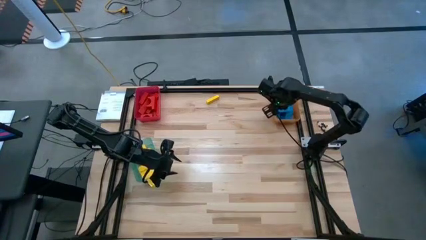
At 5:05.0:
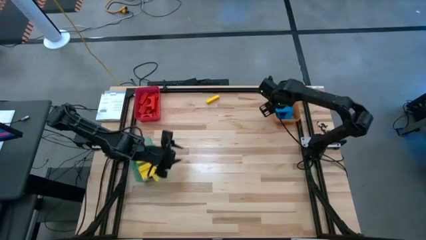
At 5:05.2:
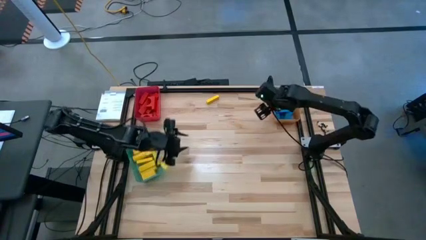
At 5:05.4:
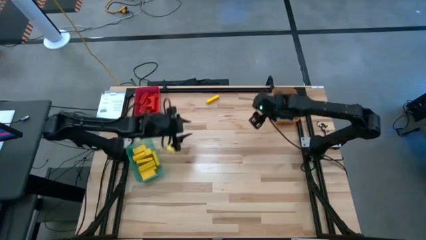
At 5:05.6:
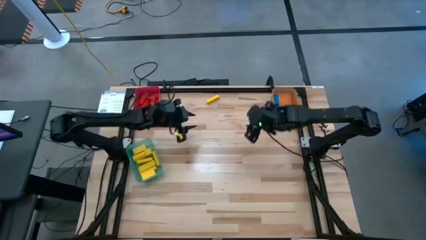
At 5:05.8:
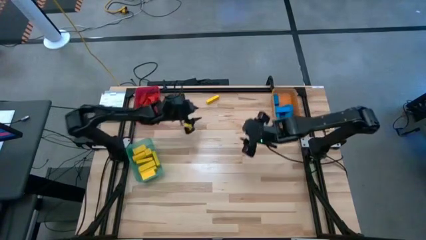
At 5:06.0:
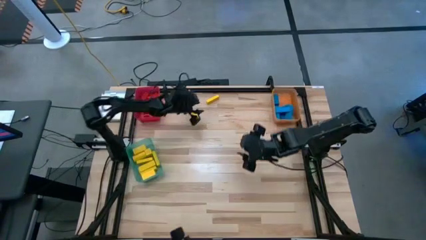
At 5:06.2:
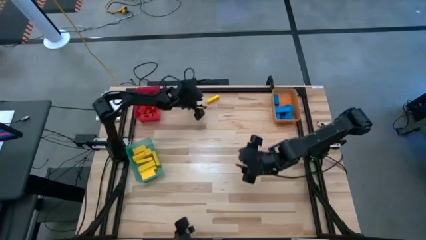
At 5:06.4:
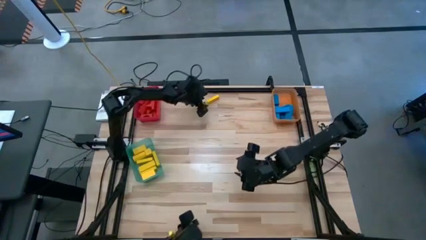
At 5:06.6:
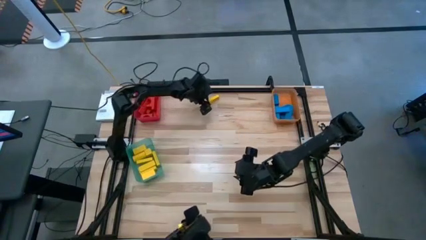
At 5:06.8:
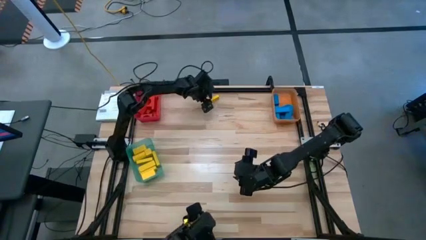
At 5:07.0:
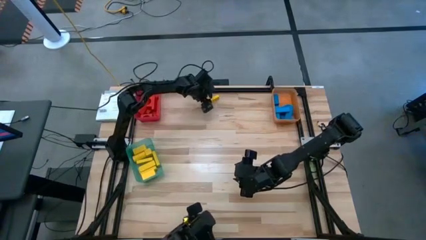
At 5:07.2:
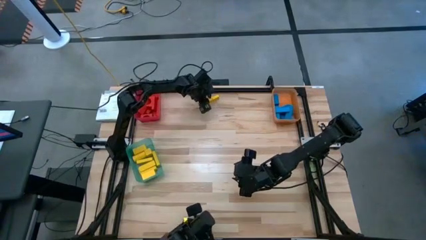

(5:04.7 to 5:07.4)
Task: Sort blocks
Put the yellow block into the green bin

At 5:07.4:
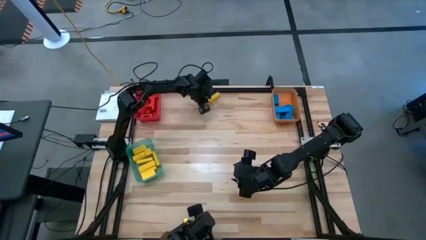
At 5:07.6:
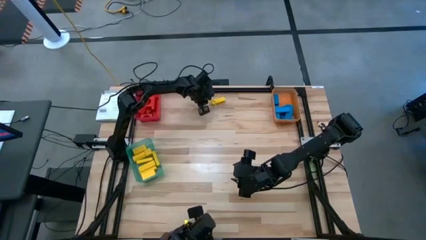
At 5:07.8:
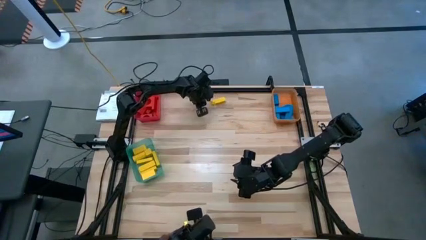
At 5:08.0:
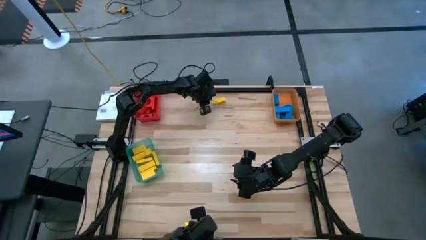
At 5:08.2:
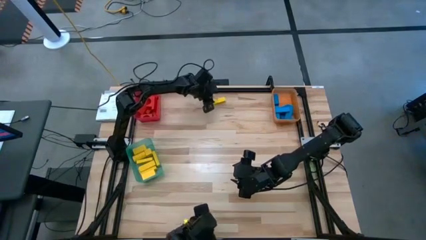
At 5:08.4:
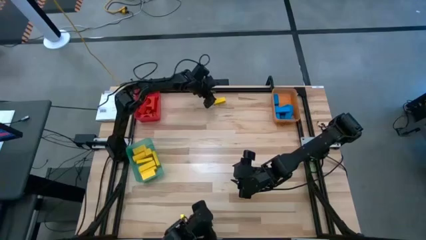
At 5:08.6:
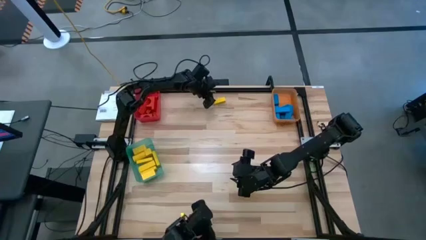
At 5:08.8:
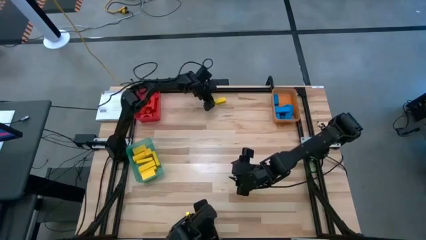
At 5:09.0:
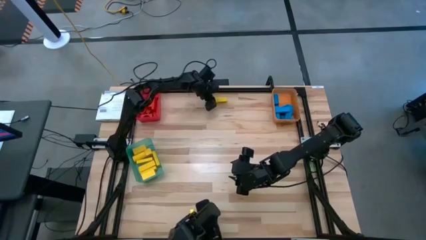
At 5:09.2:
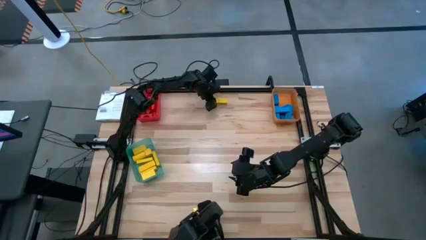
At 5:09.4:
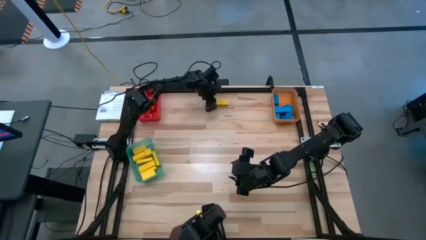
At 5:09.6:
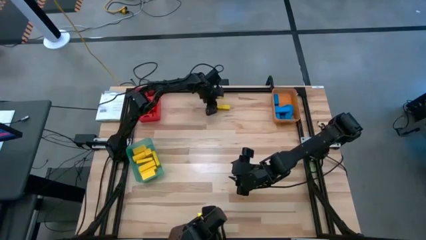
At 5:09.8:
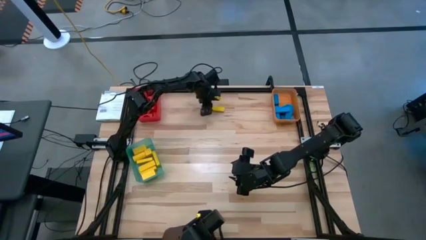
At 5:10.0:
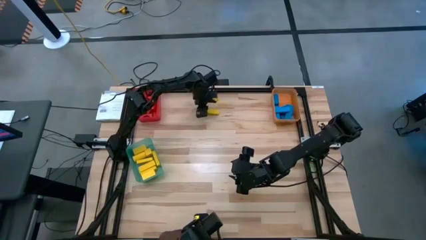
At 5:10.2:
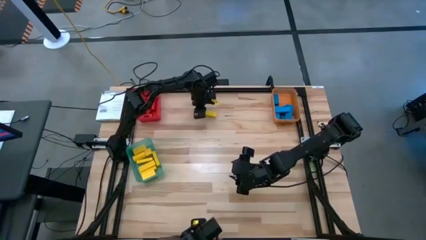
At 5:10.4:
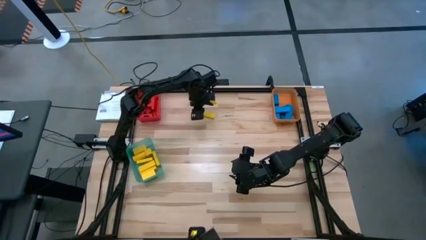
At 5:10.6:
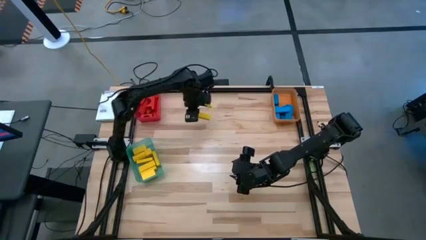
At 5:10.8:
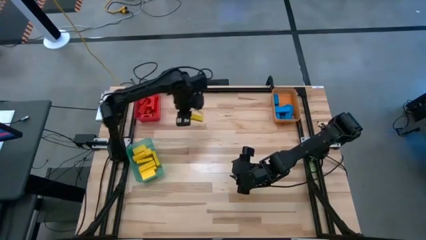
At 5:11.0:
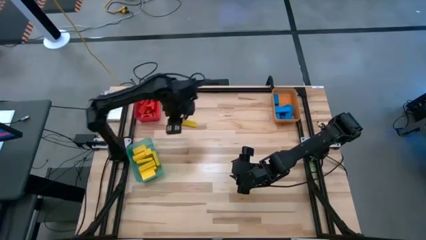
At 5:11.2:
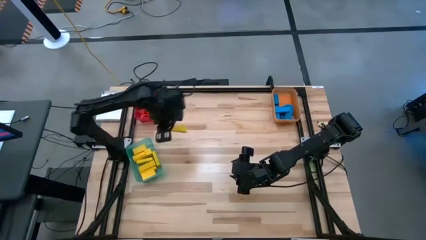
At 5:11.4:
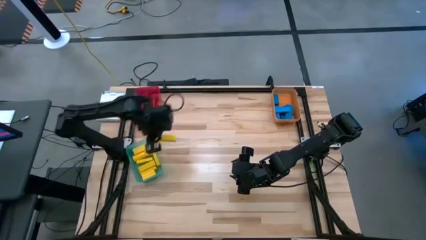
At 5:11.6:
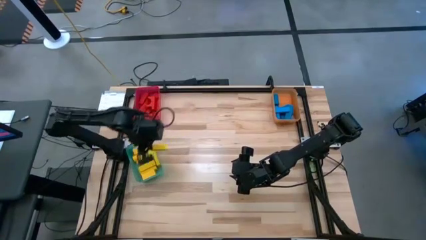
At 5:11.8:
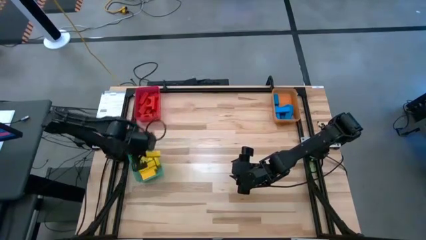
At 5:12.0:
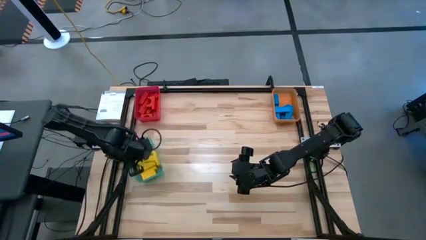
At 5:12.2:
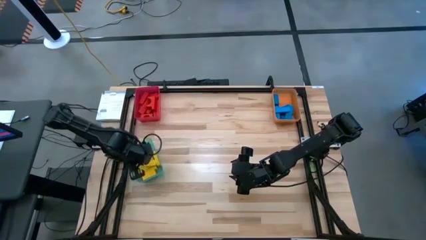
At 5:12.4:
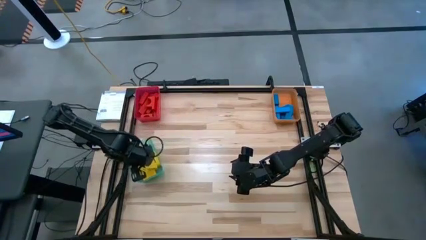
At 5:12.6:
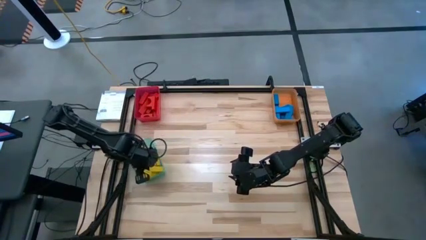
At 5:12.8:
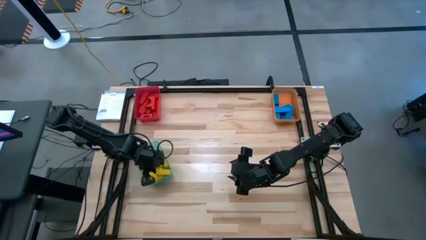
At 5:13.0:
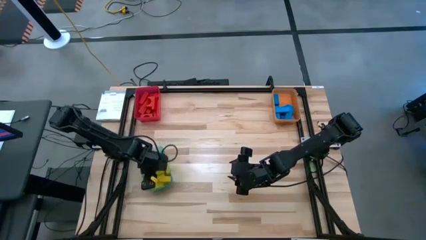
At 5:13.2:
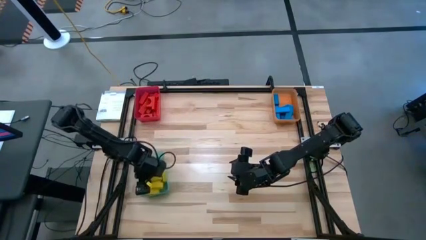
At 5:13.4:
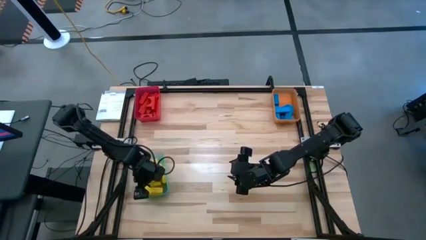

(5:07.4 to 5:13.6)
Put the yellow block into the green bin

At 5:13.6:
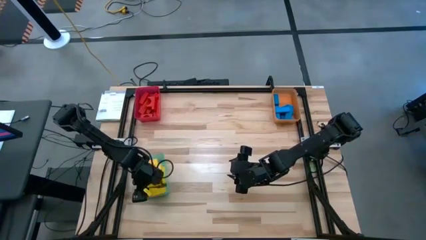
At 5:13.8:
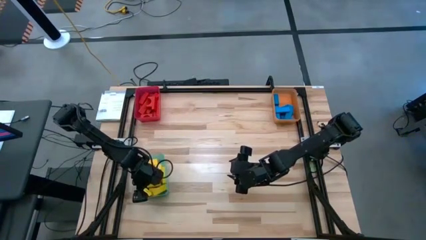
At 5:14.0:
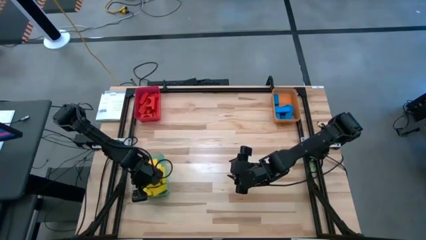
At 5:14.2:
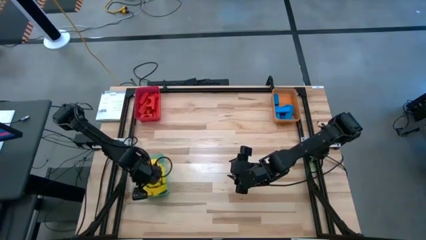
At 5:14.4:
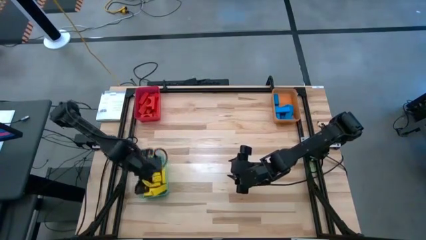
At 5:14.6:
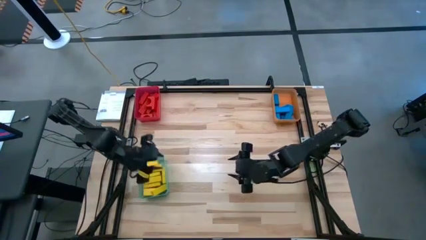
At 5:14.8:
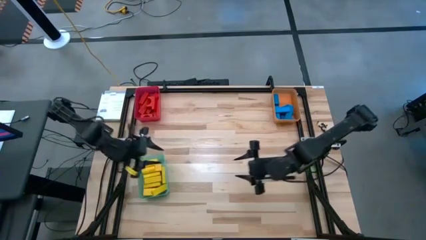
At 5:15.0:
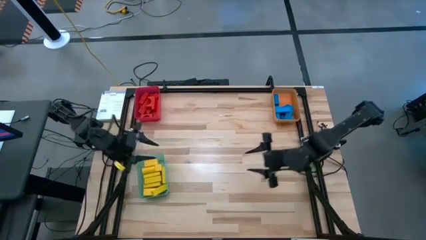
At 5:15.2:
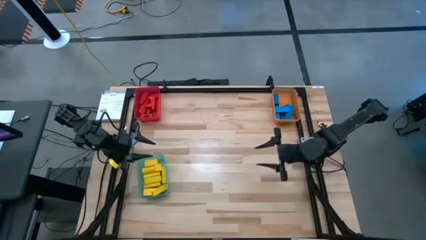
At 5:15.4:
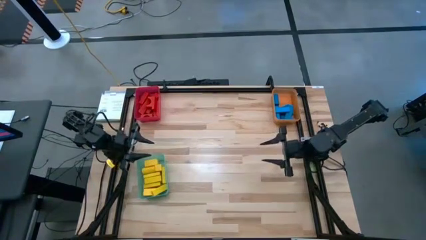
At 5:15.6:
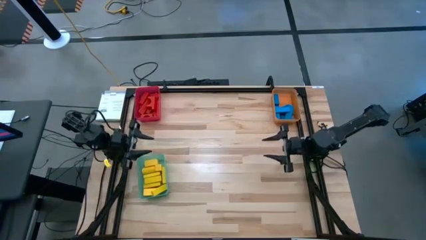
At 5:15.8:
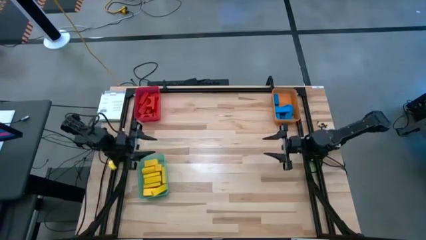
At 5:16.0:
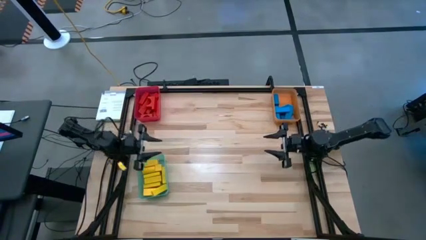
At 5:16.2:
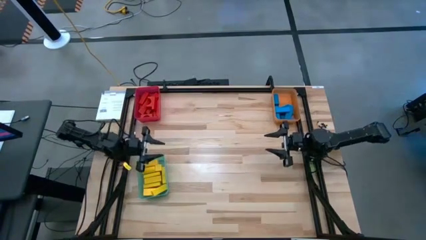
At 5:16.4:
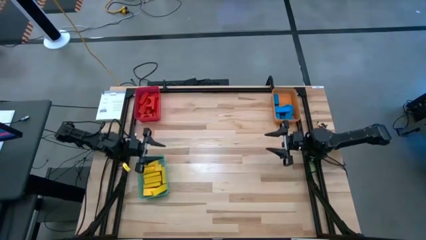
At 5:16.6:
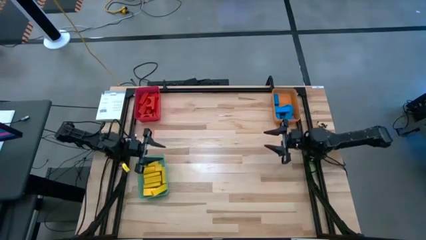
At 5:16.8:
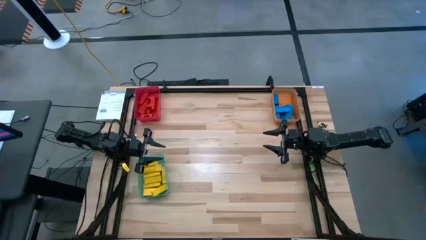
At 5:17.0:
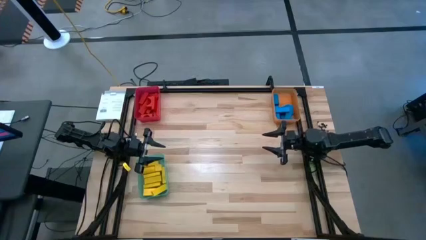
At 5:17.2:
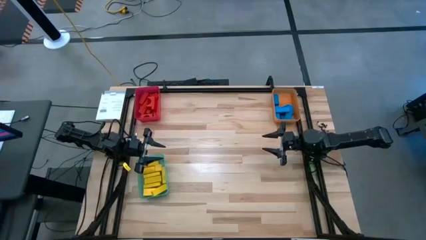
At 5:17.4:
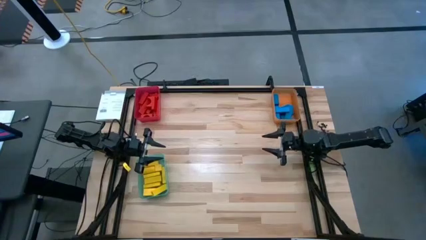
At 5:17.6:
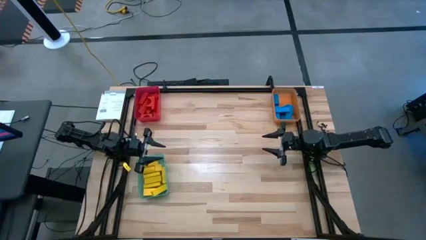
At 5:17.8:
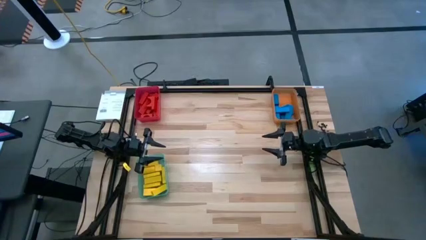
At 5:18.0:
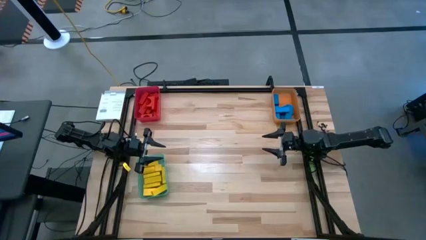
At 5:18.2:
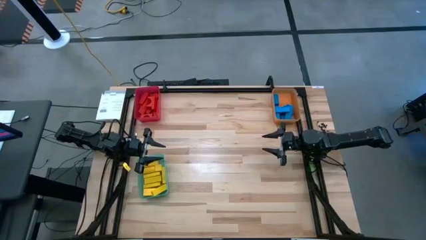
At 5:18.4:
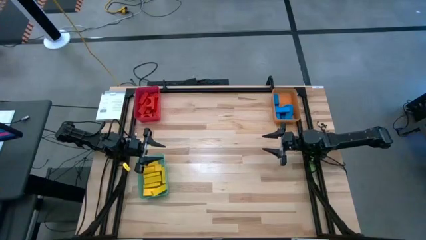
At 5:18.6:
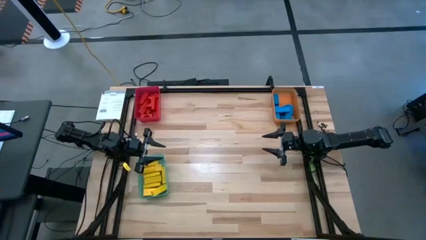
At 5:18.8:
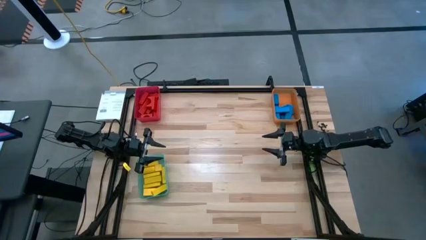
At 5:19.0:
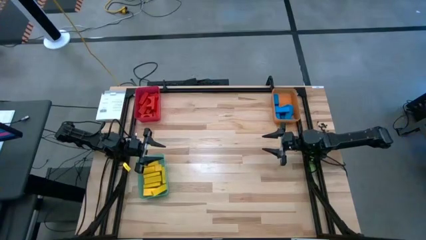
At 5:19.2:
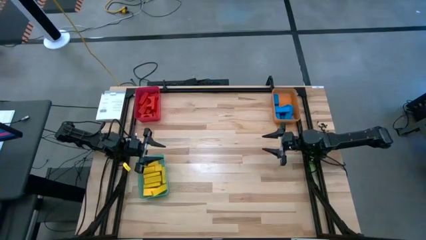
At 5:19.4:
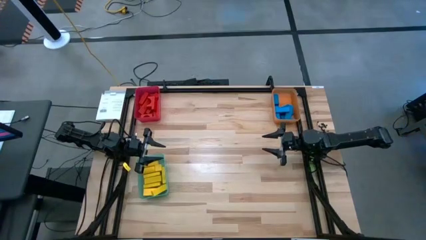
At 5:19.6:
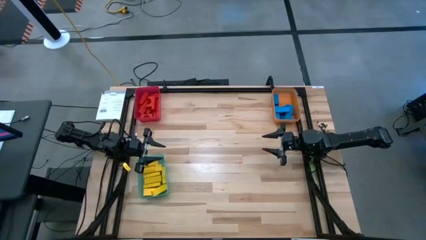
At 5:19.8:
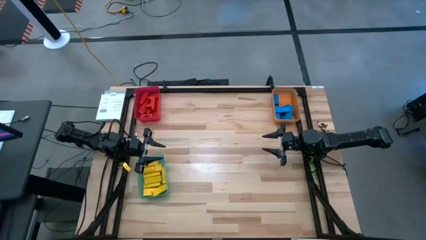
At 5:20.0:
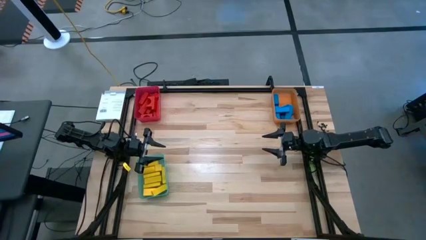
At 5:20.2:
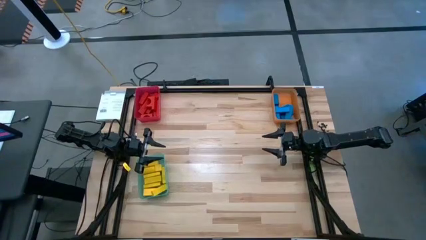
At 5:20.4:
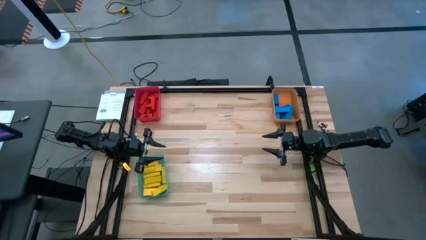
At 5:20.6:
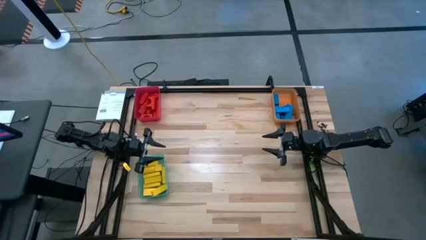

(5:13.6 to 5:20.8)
Return to Home Position
